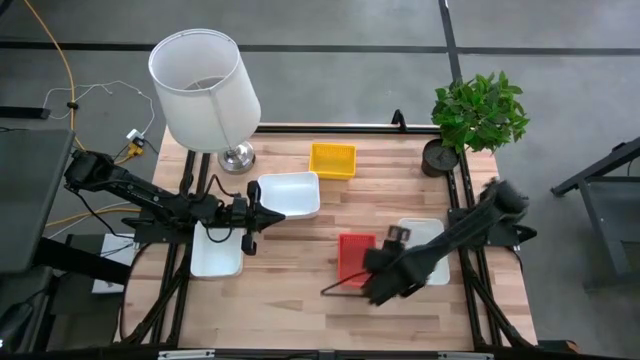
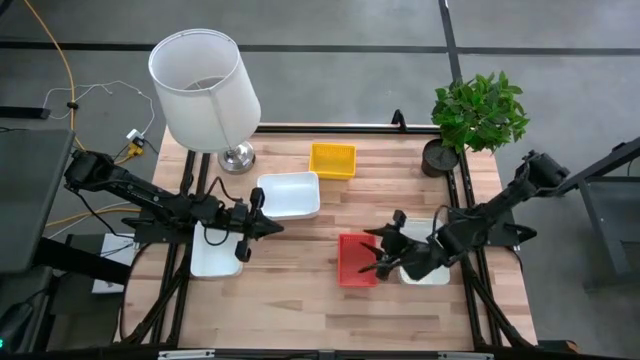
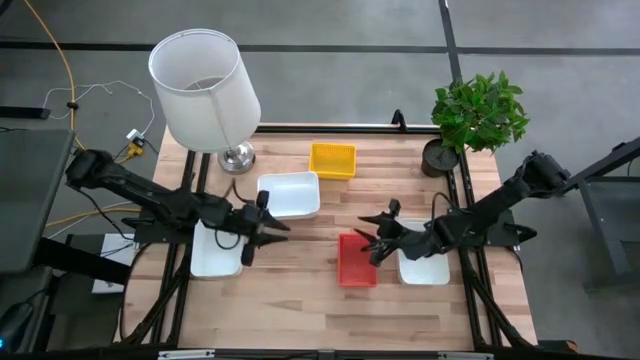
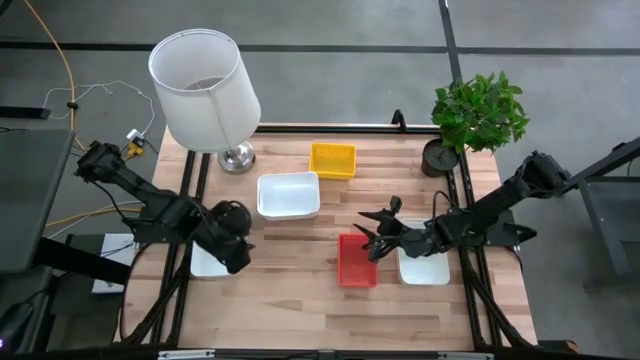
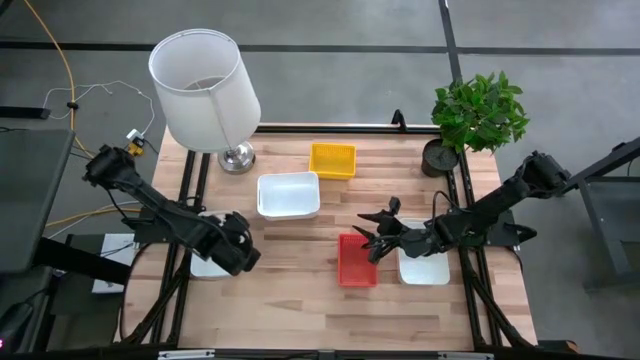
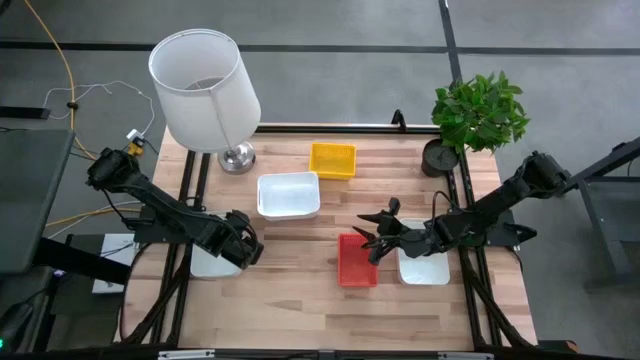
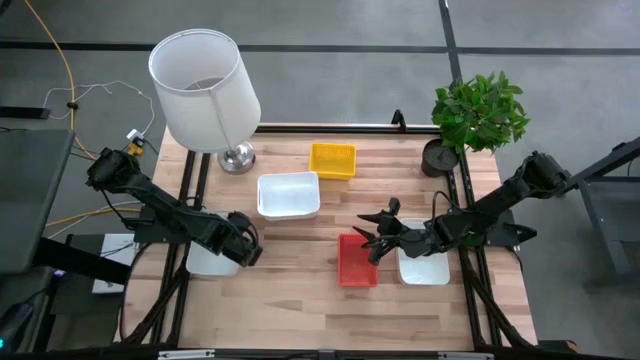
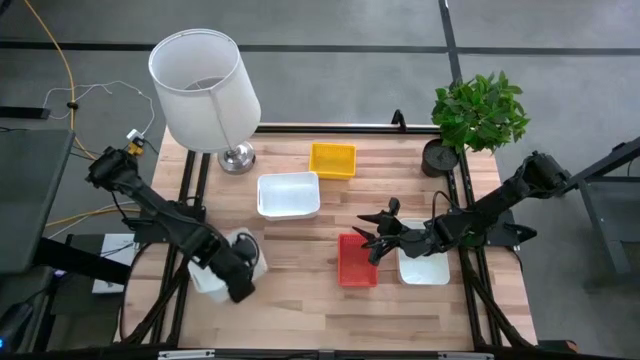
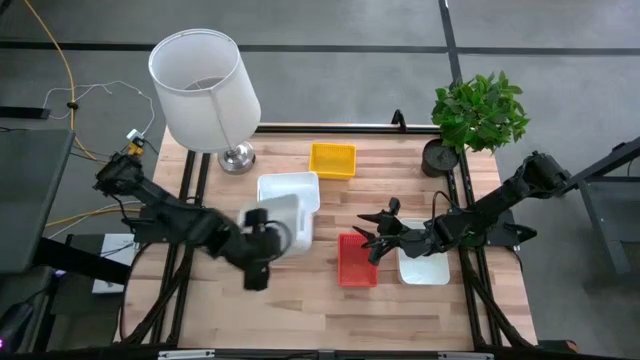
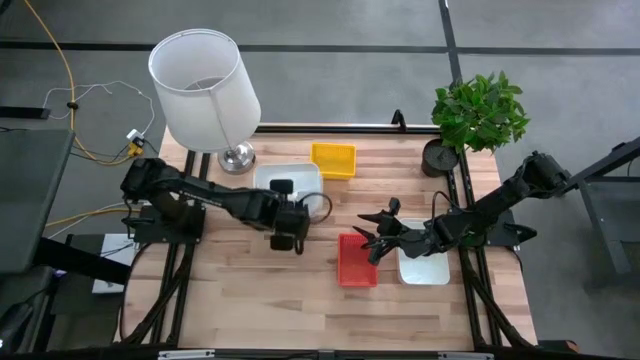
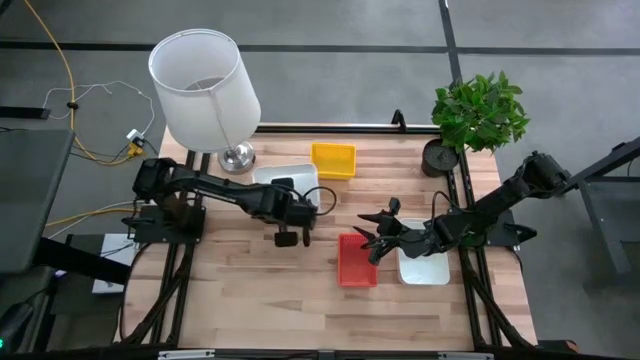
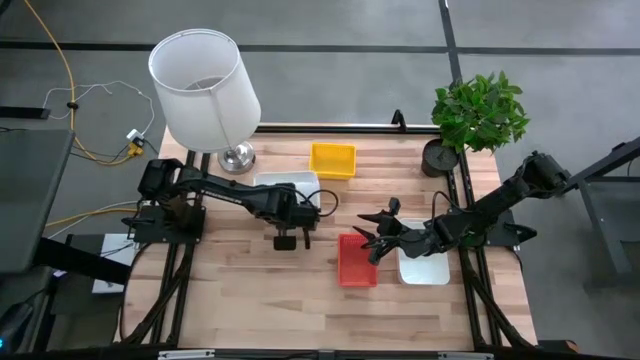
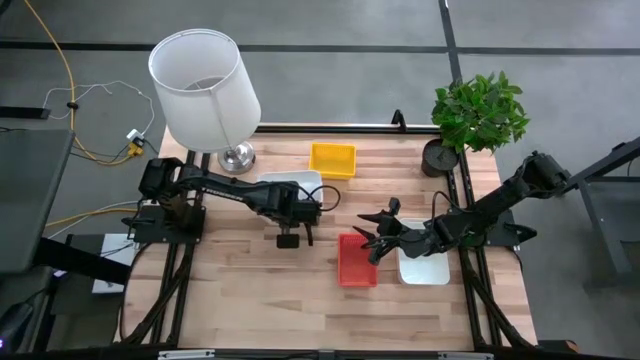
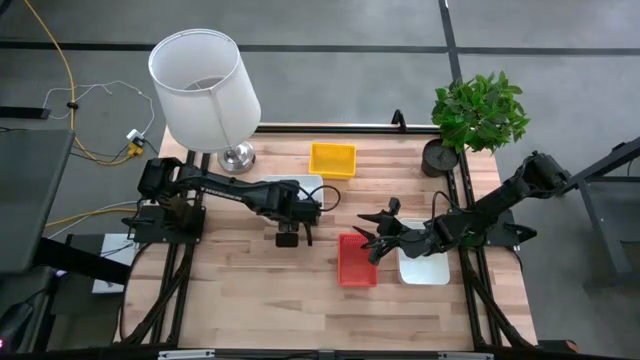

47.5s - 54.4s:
Stack the bottom left white bin on the top white bin

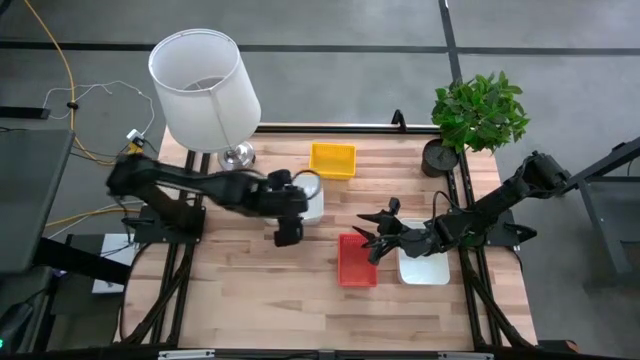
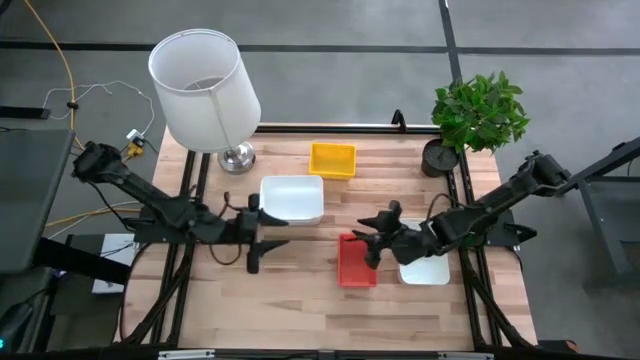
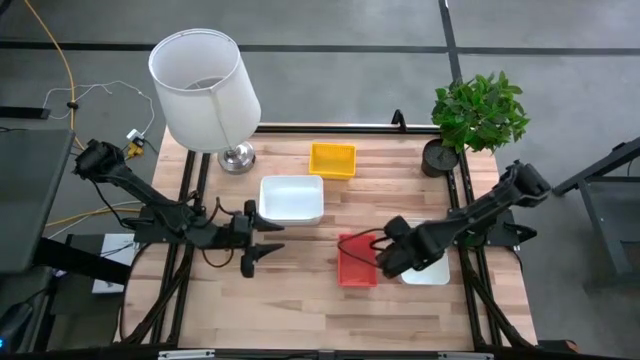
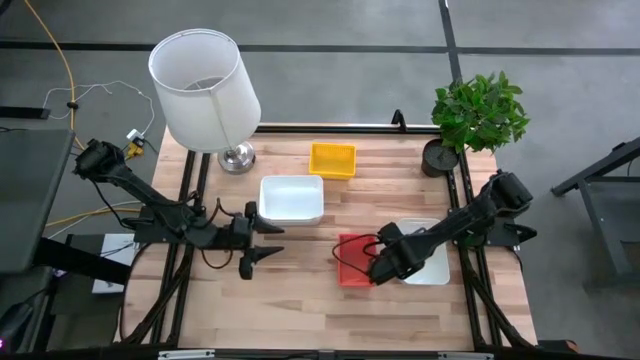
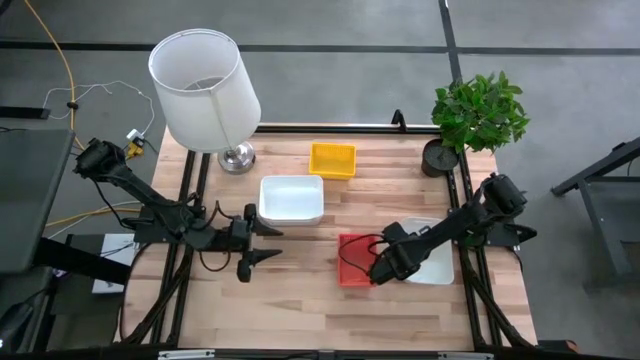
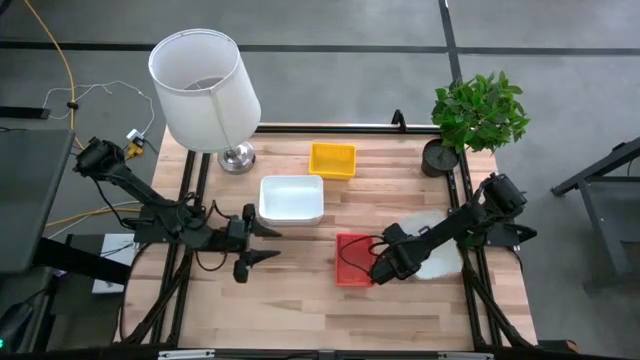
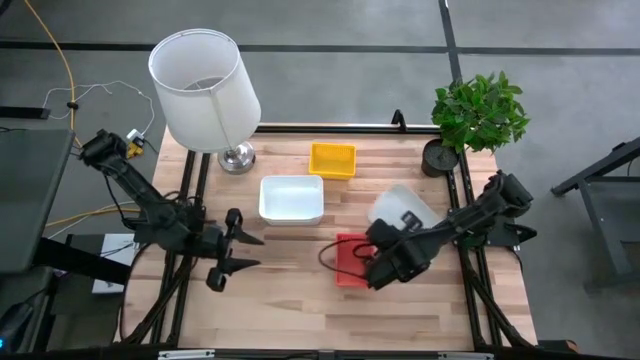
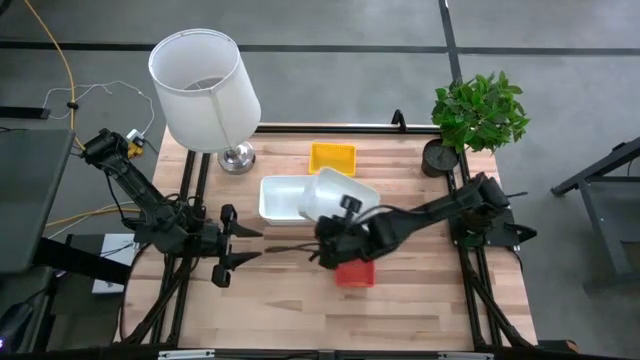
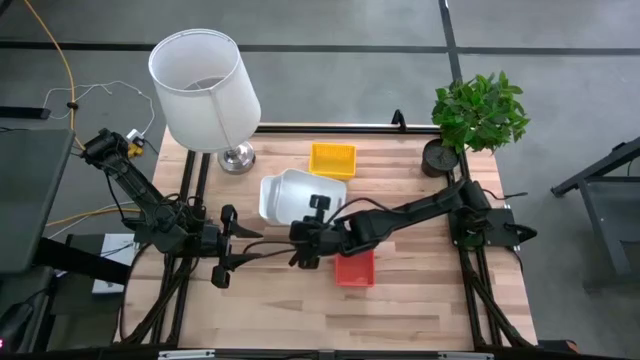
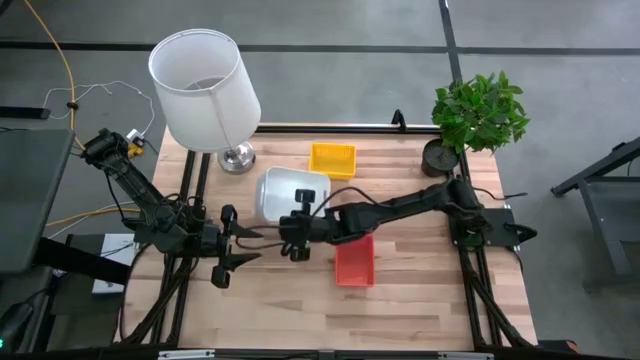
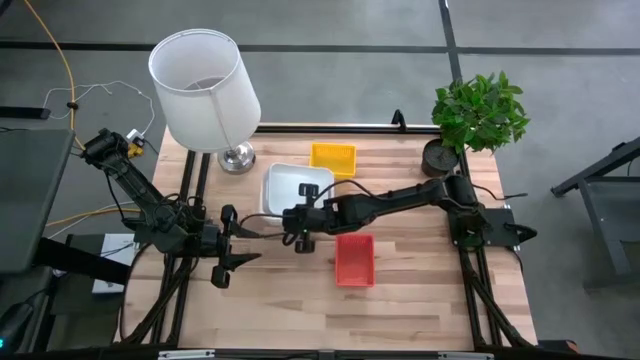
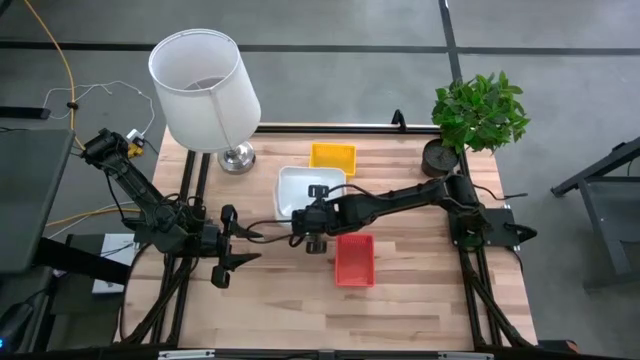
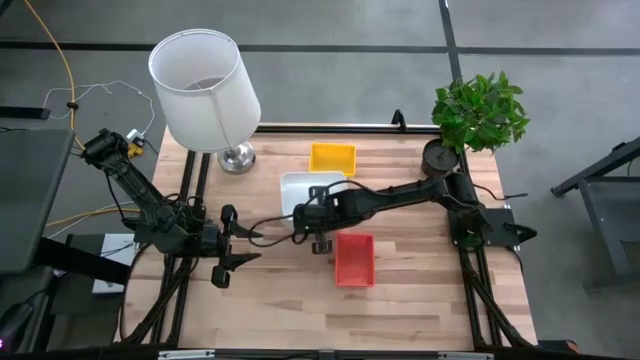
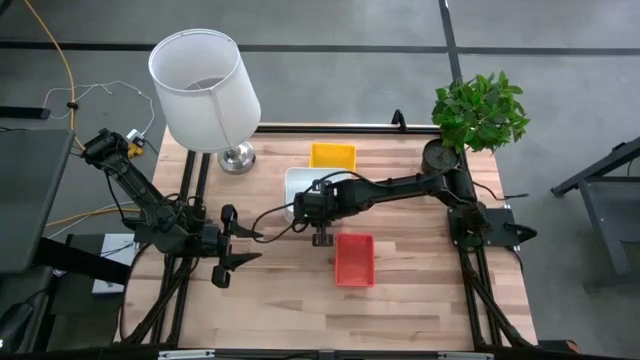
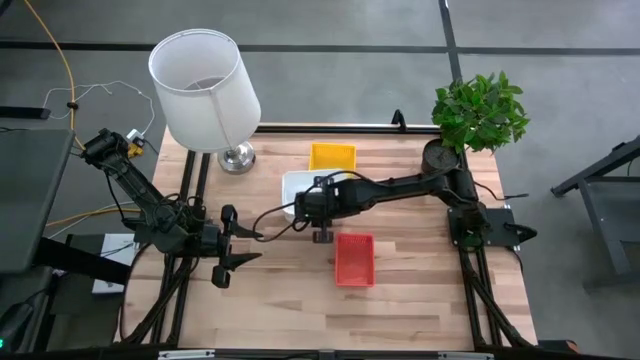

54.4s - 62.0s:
Stack the bottom white bin on the top white bin

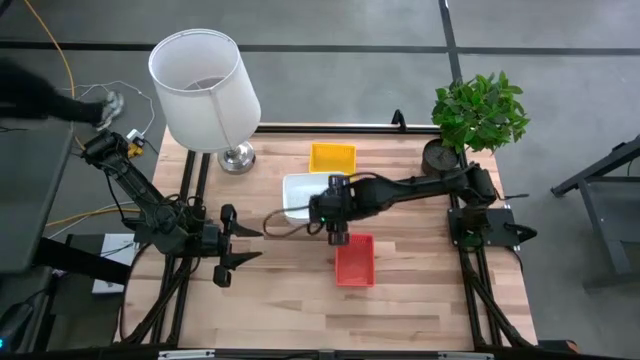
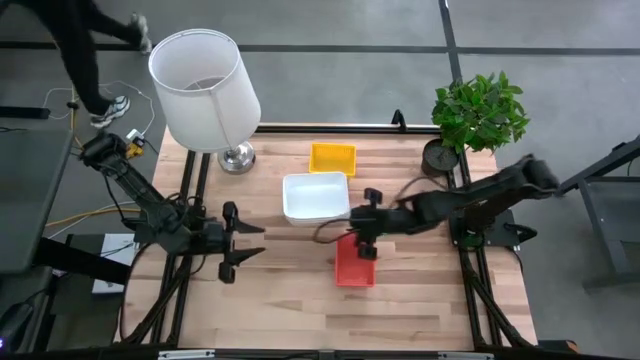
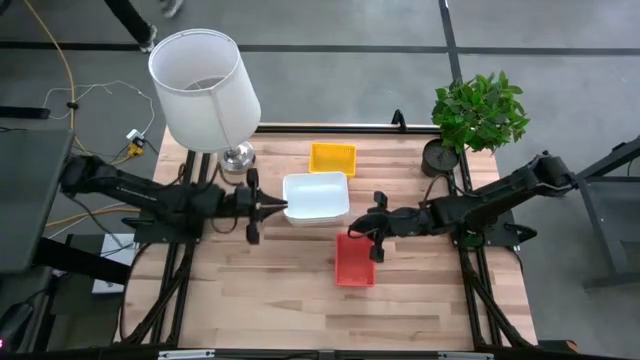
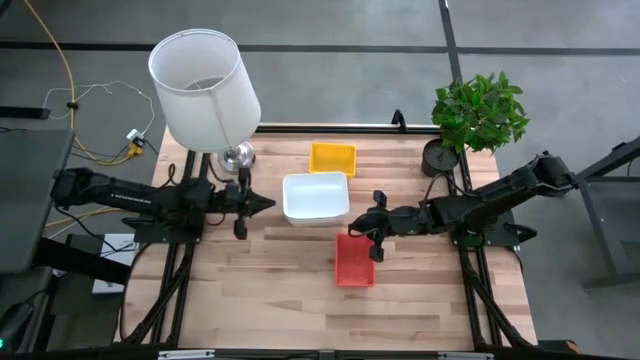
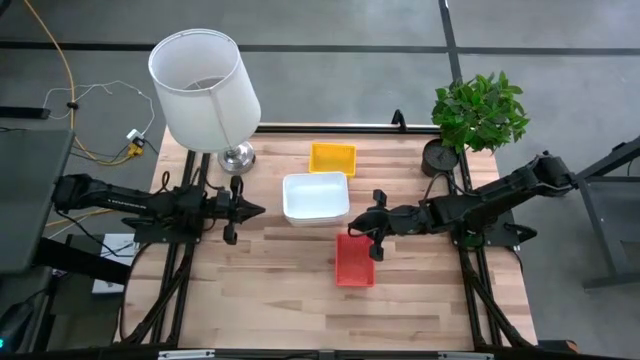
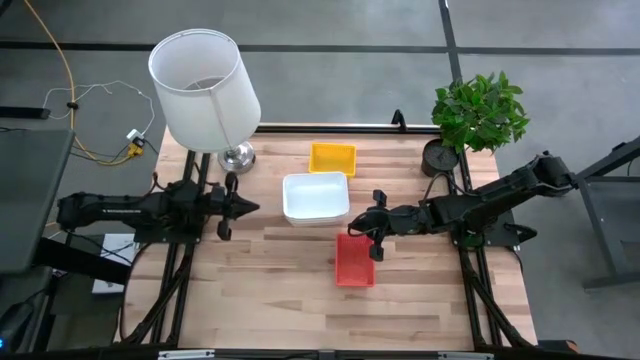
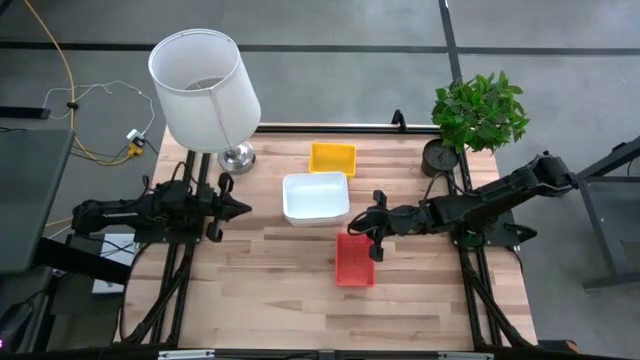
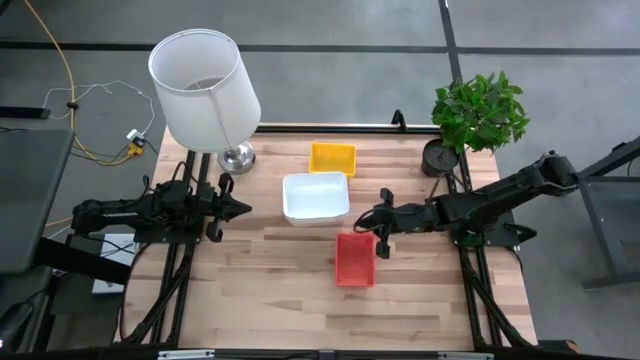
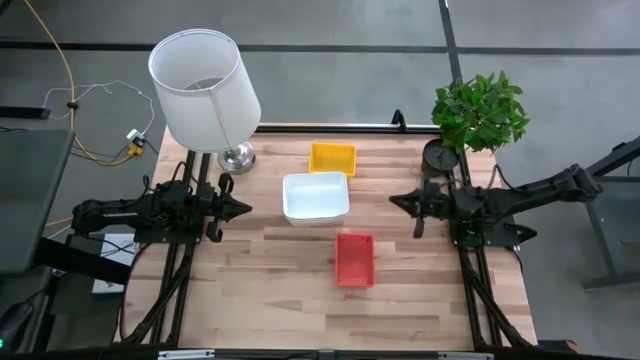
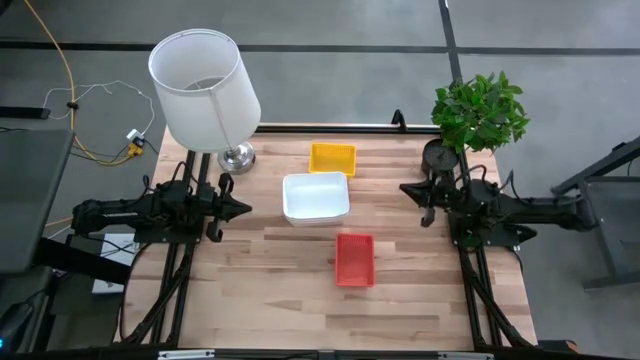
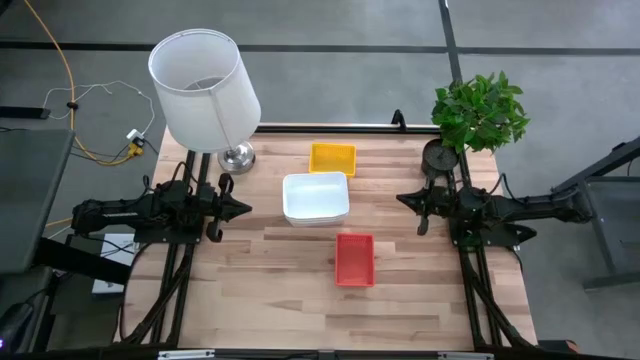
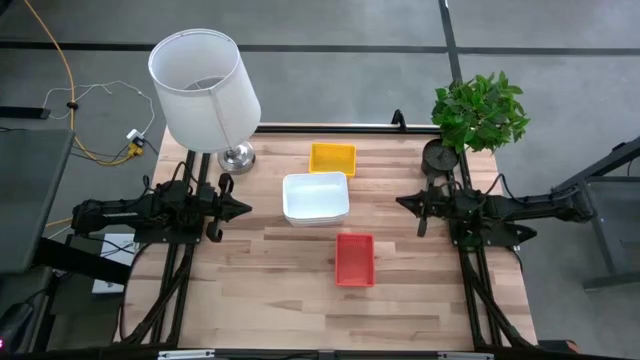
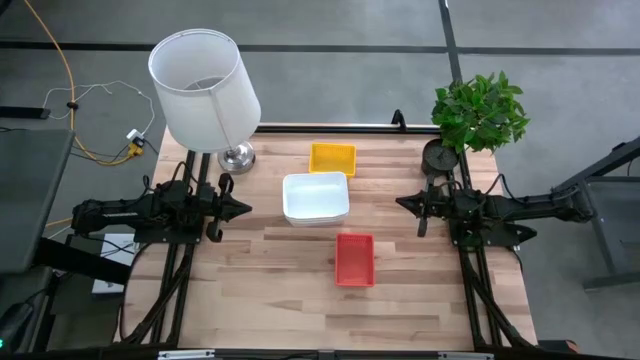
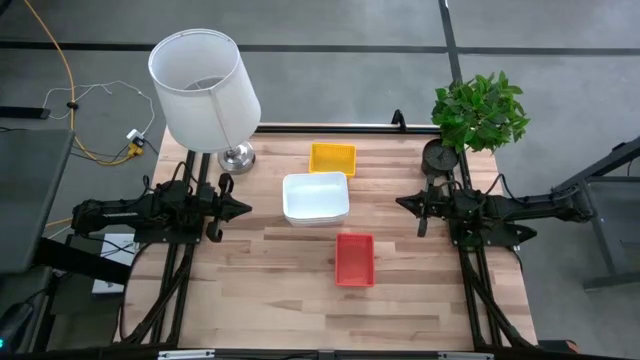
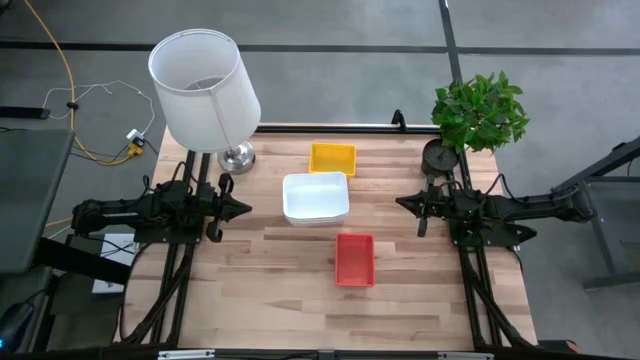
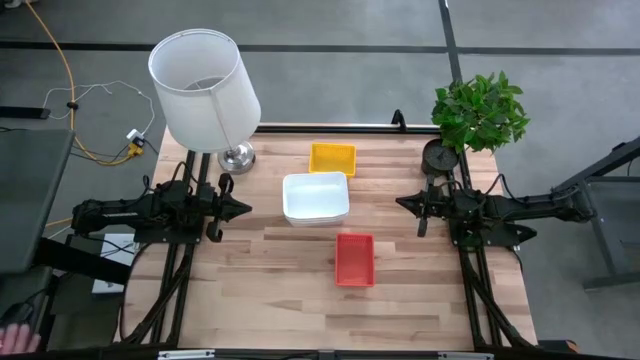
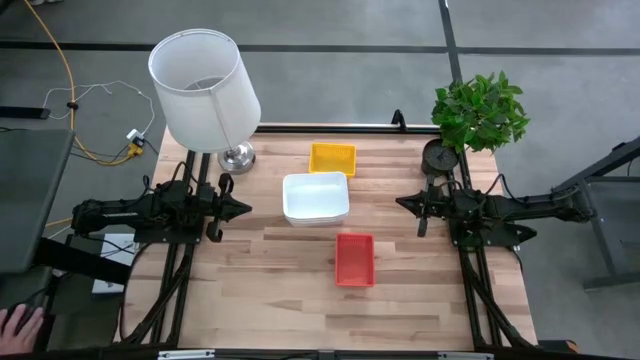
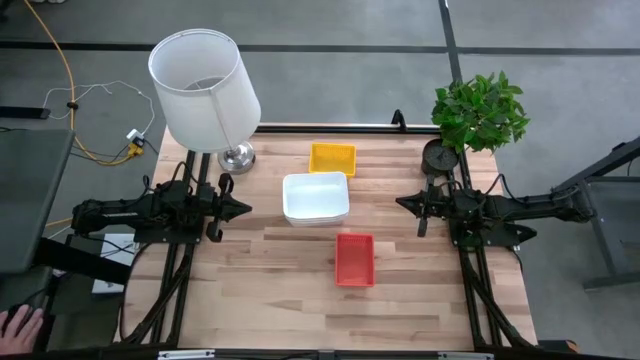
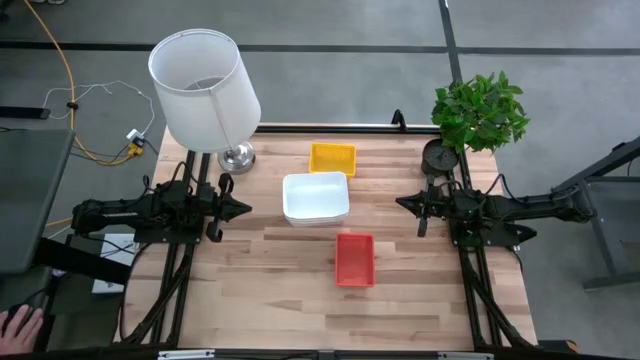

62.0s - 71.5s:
Return to Home Position
